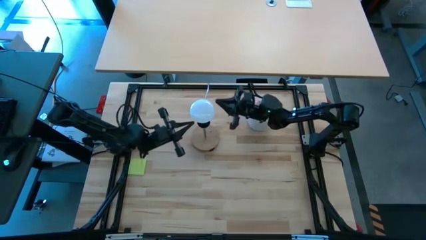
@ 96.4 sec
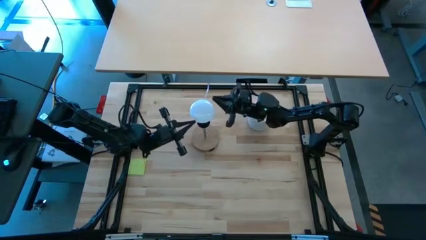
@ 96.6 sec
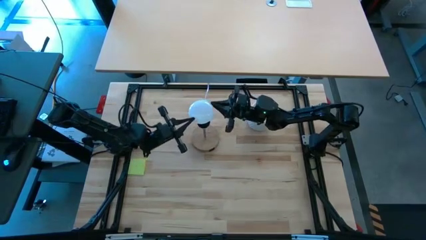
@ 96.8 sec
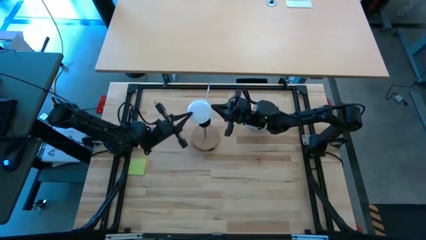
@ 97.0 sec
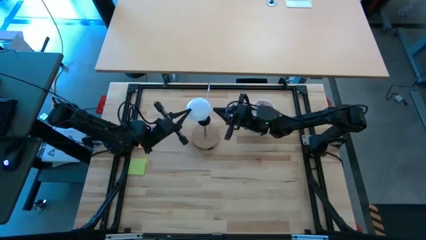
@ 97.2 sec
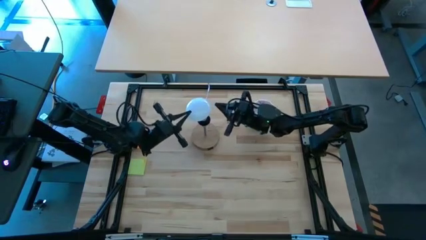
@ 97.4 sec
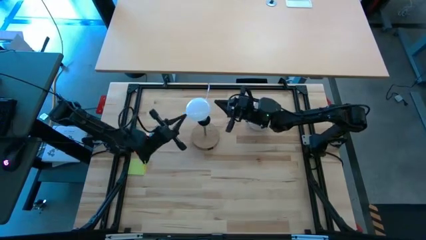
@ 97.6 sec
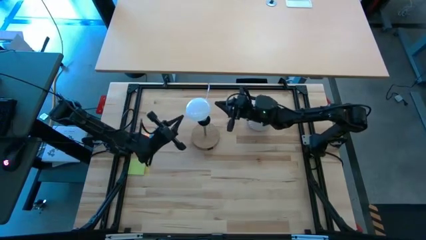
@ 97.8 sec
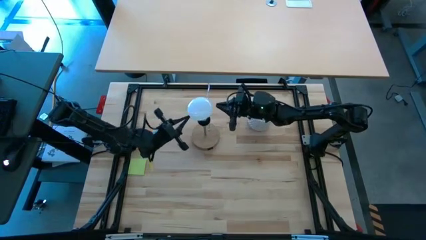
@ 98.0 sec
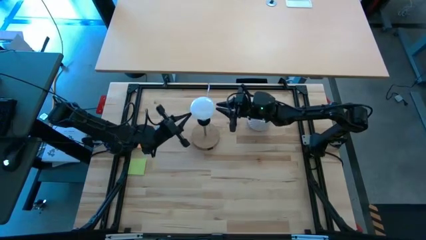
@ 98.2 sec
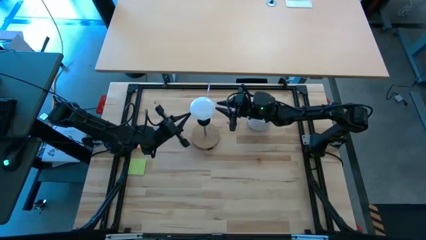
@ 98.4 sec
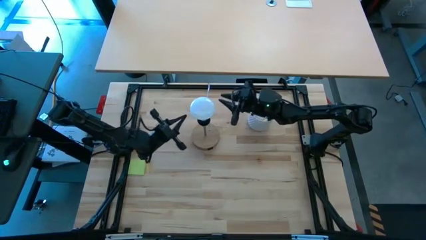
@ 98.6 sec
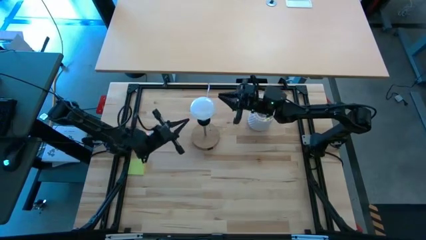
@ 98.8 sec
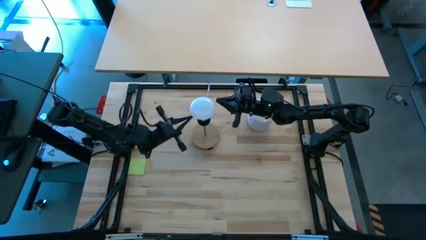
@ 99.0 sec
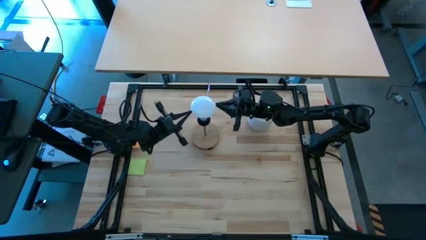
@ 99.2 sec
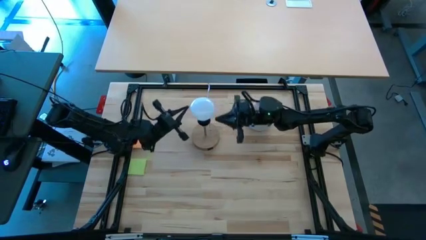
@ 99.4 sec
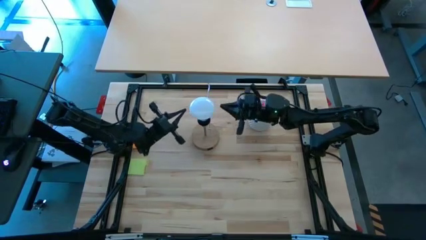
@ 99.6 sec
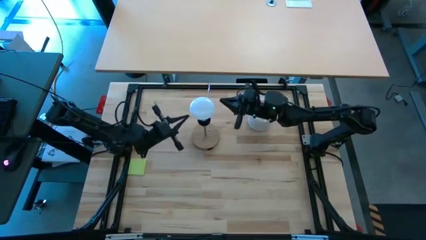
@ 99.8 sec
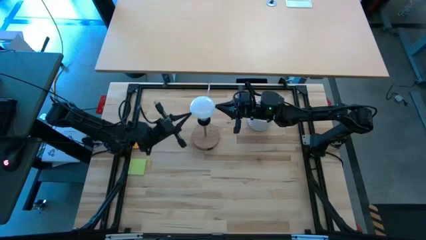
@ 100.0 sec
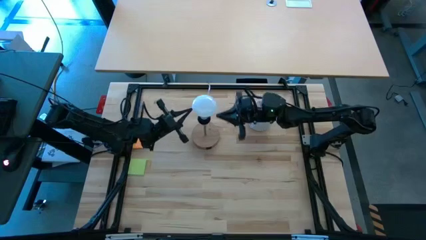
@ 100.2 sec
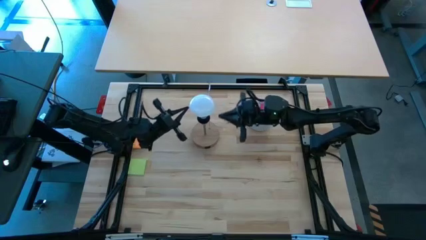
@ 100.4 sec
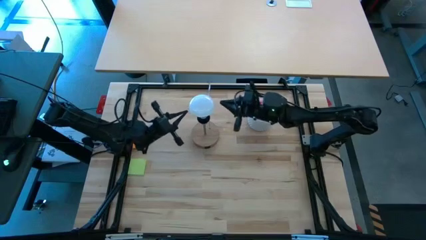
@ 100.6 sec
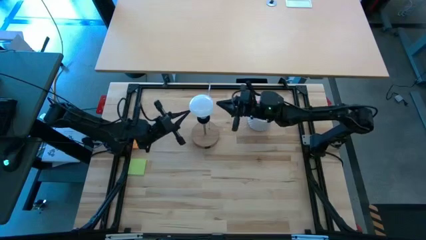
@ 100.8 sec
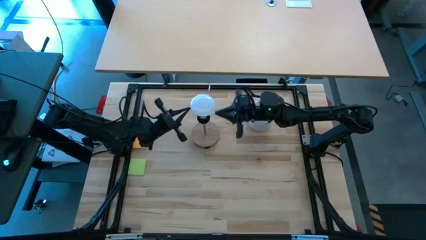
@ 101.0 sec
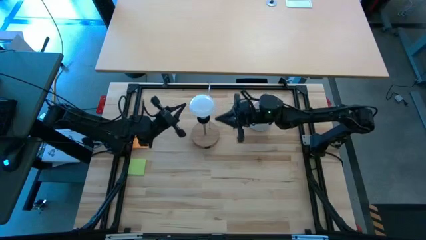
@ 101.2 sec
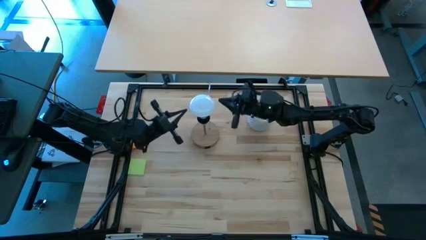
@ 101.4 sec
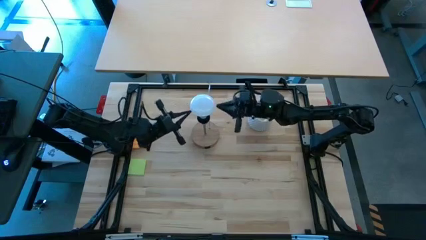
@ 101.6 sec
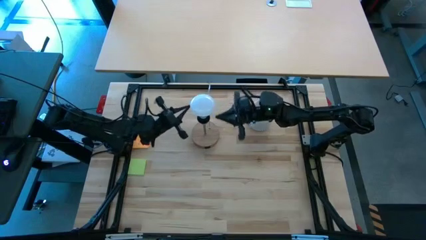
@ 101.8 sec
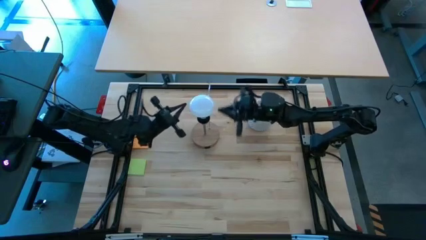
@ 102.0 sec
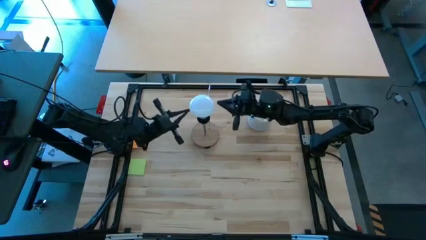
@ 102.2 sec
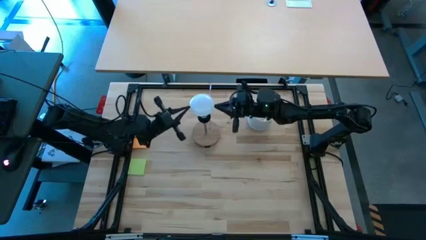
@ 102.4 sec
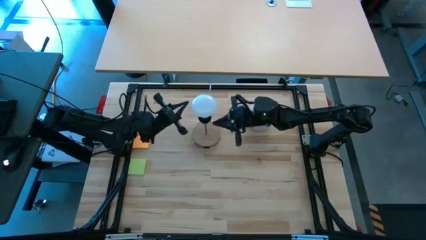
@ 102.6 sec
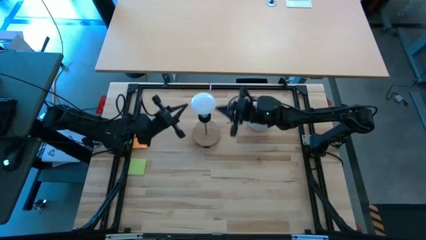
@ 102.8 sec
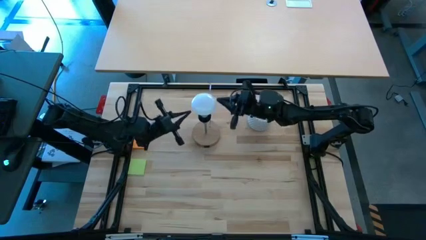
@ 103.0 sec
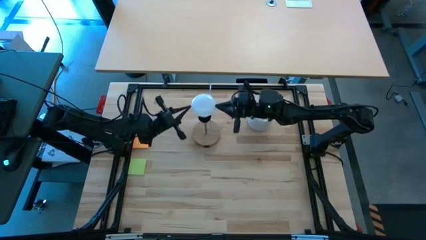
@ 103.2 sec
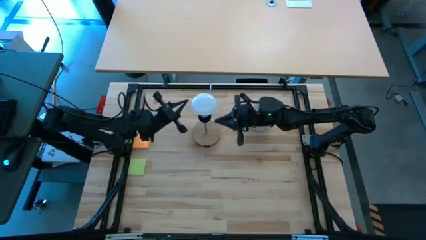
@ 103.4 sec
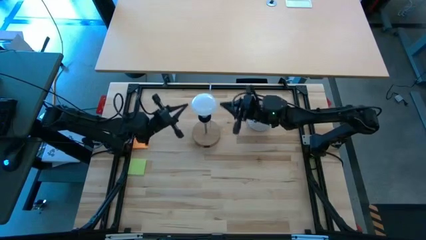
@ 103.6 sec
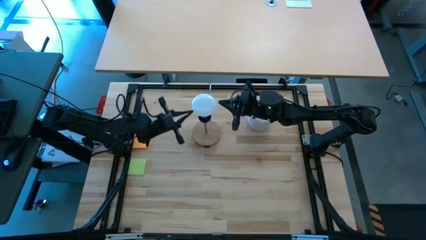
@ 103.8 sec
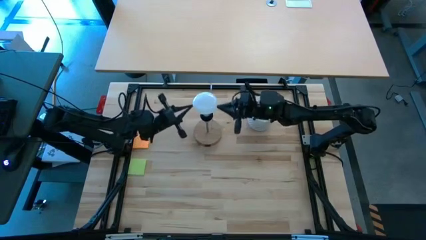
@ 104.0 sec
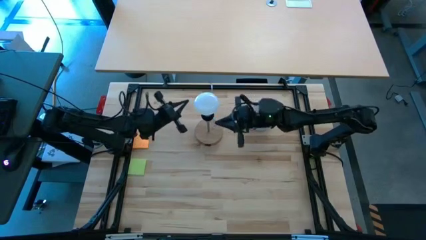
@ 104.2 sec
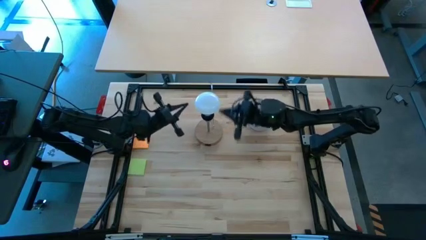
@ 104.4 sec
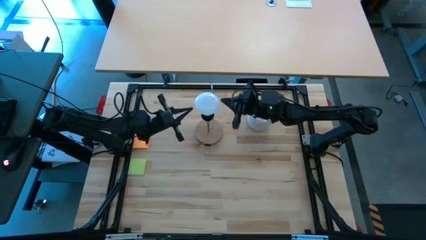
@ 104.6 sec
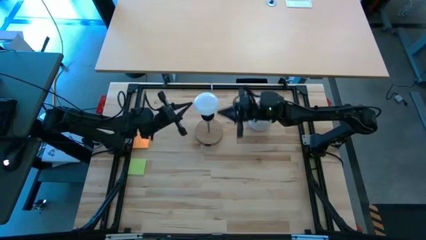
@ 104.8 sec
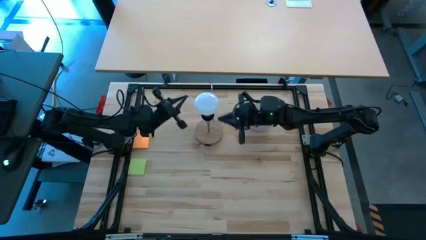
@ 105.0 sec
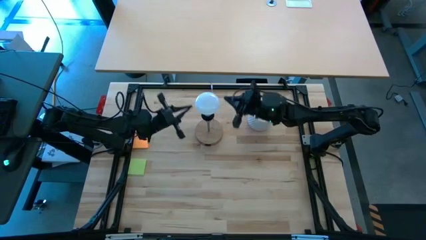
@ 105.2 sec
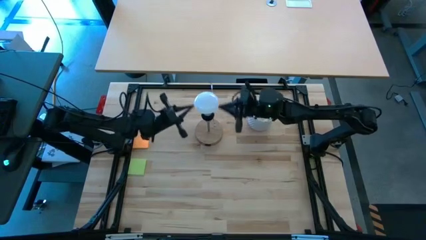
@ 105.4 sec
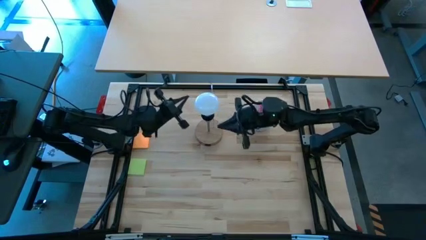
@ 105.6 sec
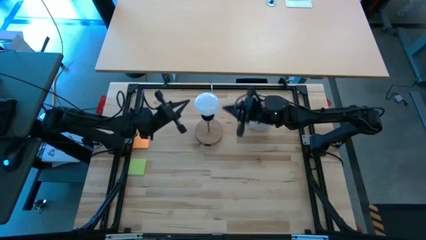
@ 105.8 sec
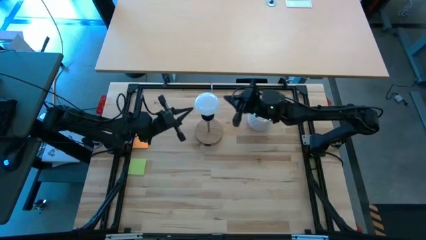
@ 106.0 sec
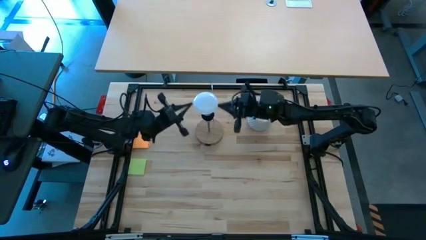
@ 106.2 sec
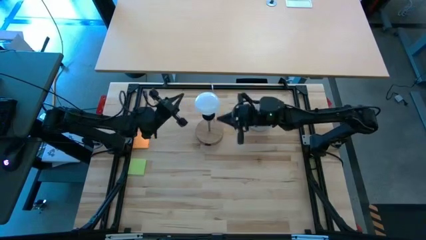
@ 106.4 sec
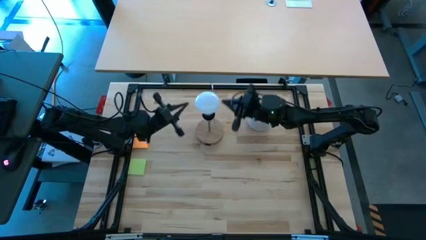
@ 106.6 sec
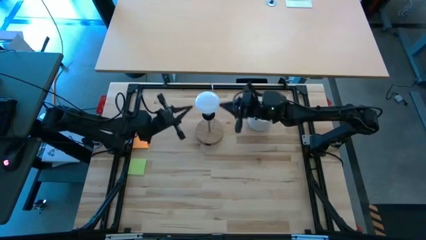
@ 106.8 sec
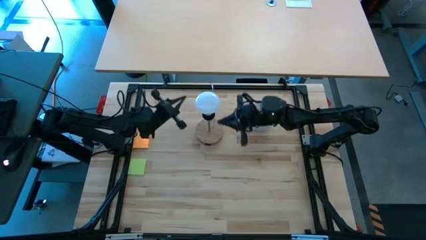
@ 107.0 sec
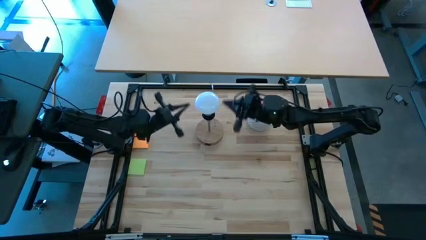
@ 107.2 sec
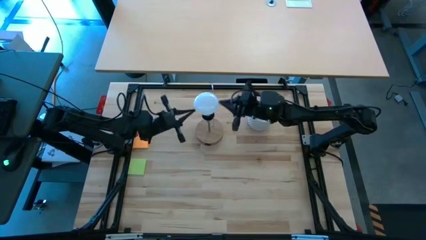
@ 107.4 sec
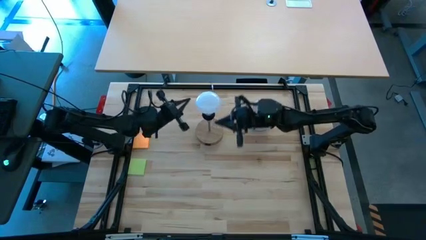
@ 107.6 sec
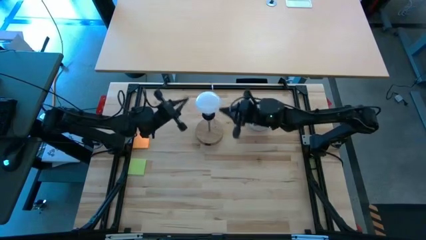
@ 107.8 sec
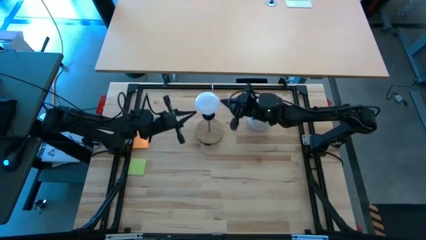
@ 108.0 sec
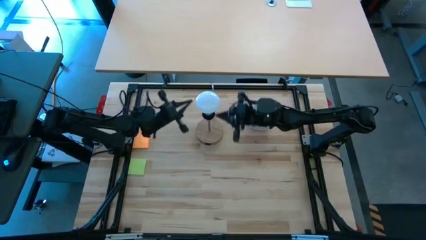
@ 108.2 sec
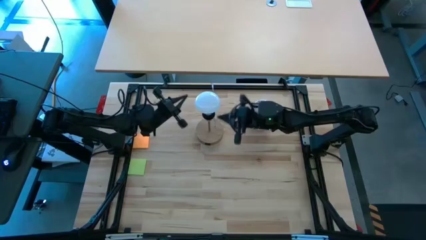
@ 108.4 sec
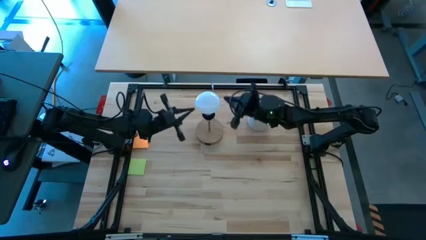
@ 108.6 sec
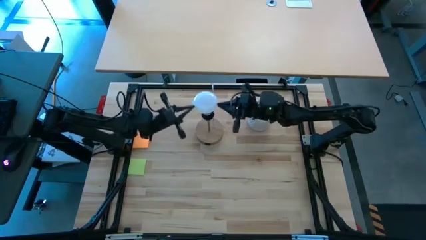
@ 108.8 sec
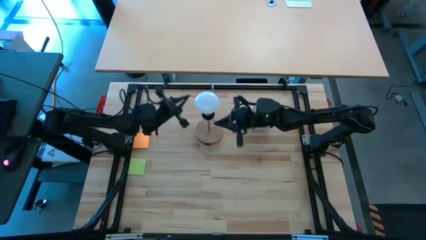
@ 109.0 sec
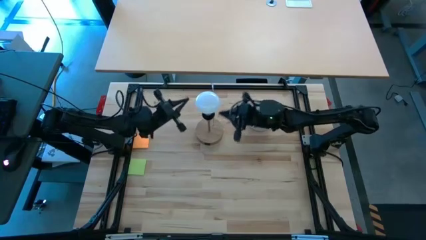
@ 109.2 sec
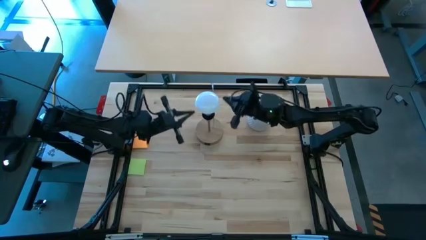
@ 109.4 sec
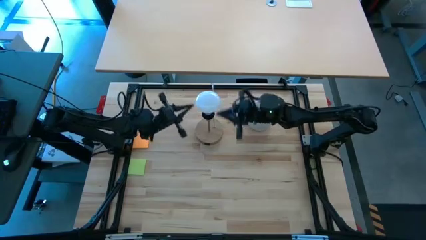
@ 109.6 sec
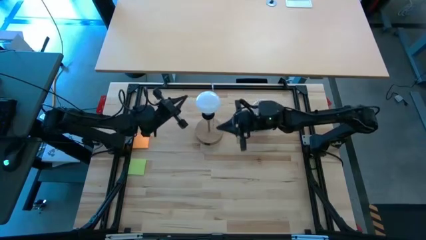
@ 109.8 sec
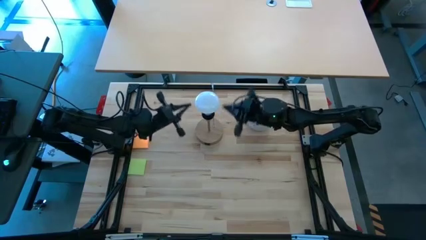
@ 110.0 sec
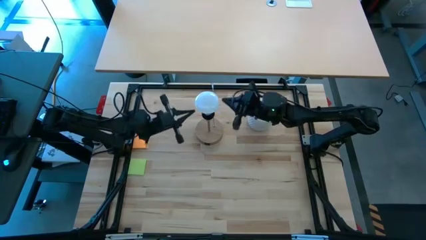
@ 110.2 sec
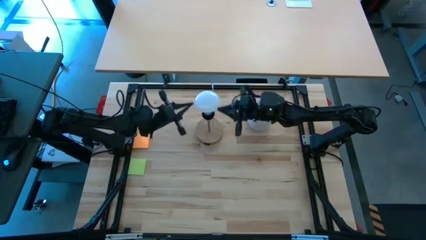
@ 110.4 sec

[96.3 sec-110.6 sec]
Task: Screw lightbulb
Insert the light bulb into the brown lamp
